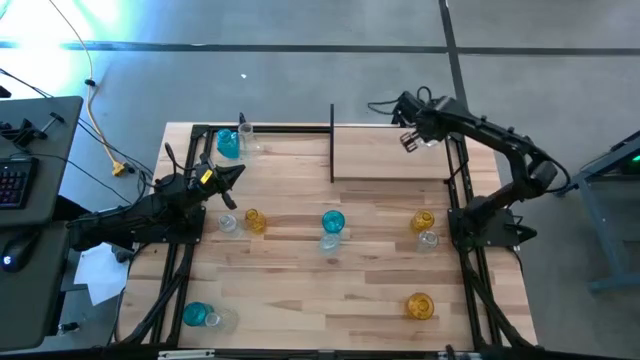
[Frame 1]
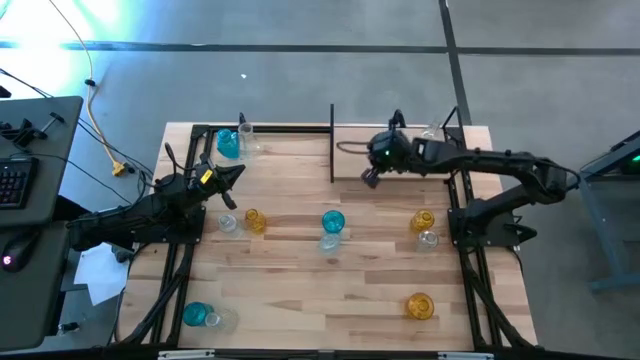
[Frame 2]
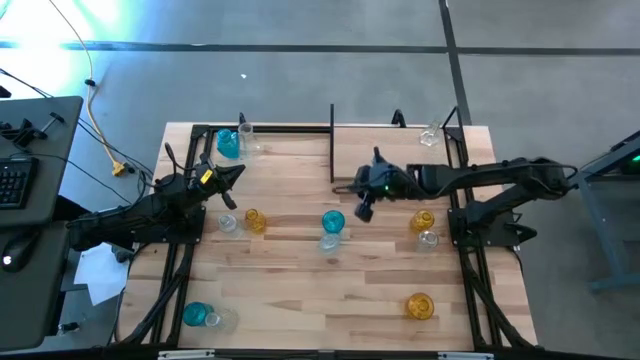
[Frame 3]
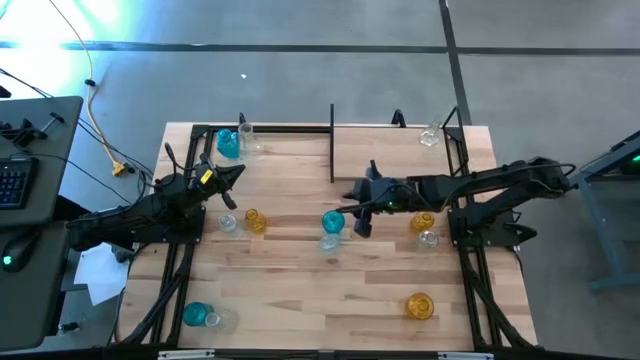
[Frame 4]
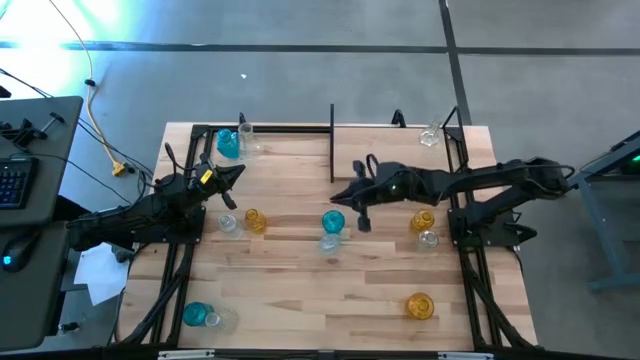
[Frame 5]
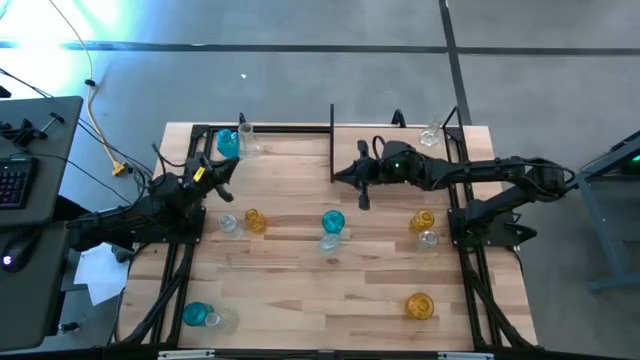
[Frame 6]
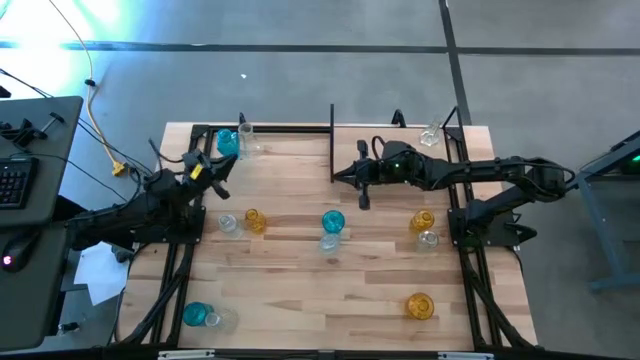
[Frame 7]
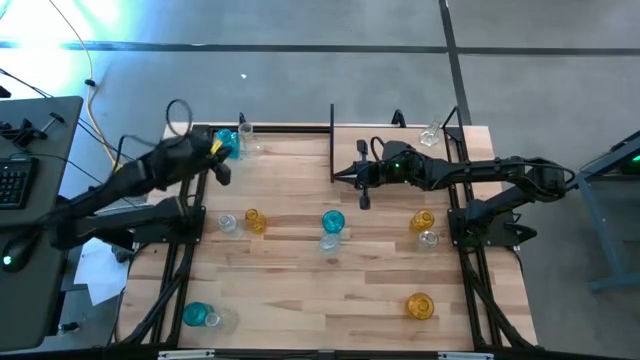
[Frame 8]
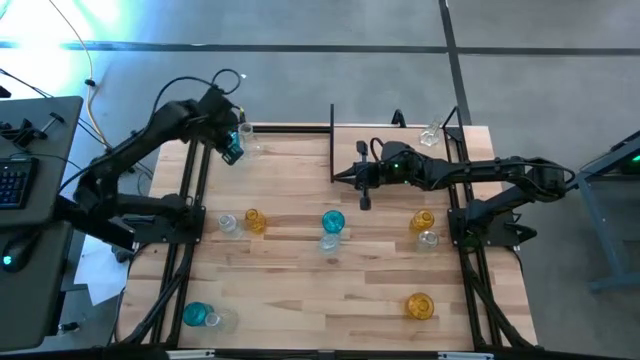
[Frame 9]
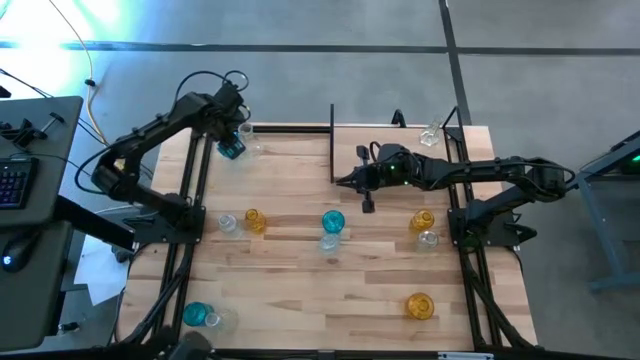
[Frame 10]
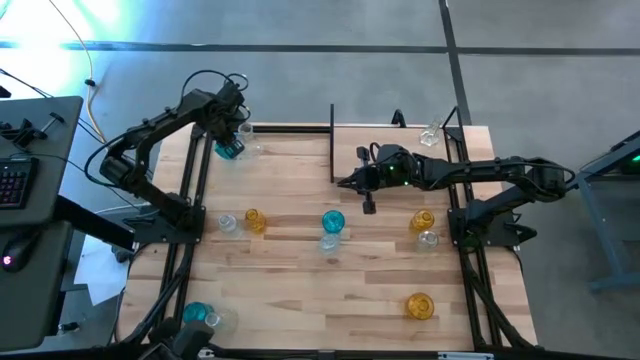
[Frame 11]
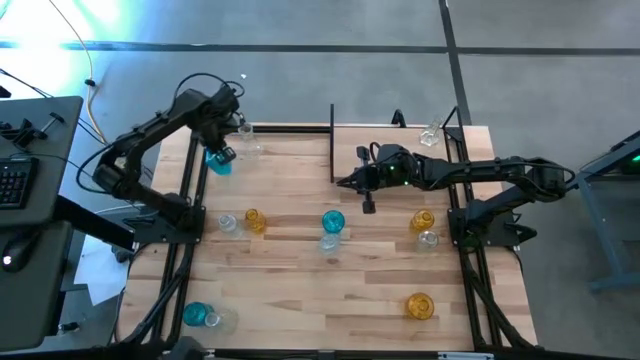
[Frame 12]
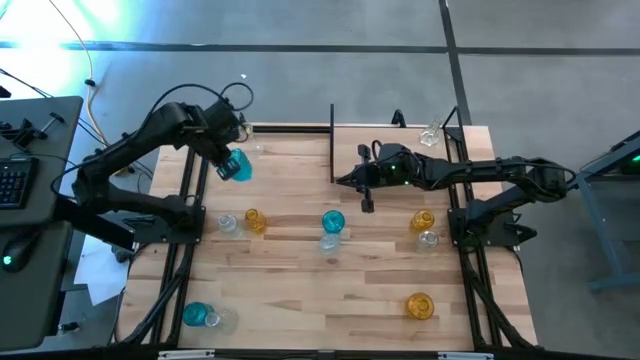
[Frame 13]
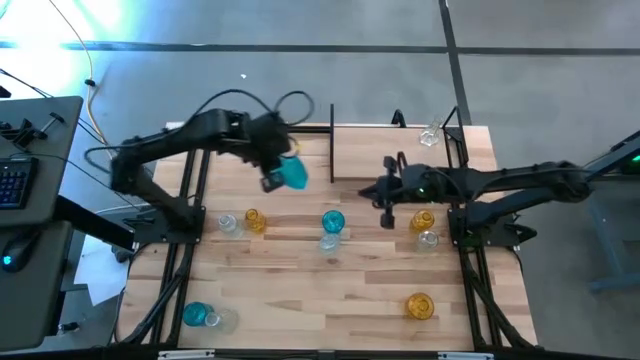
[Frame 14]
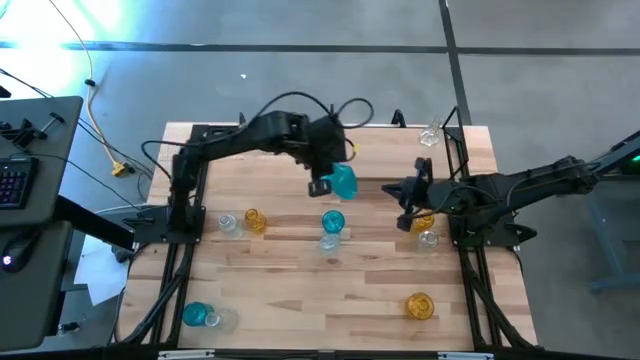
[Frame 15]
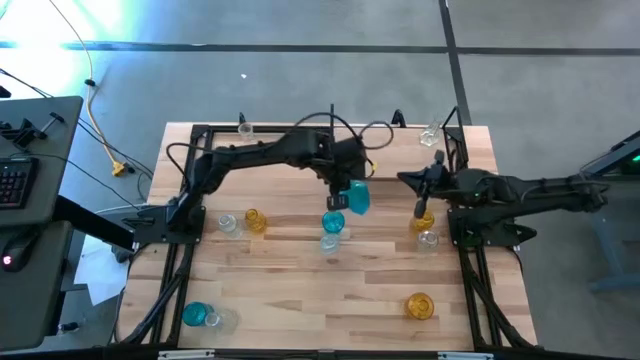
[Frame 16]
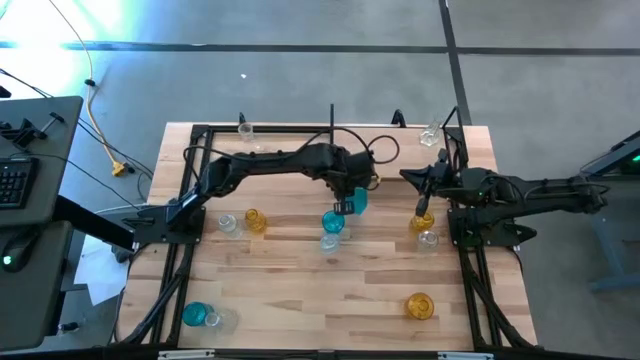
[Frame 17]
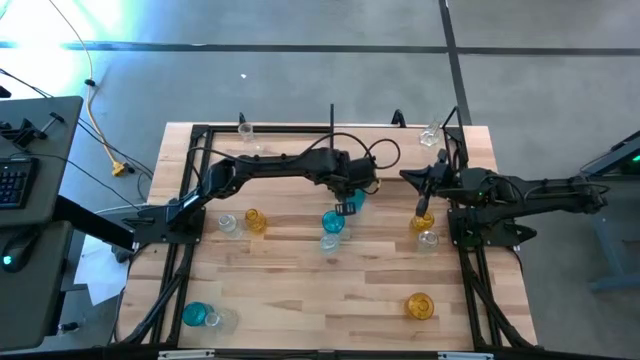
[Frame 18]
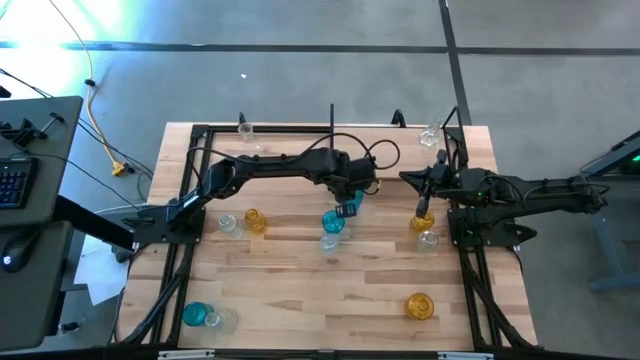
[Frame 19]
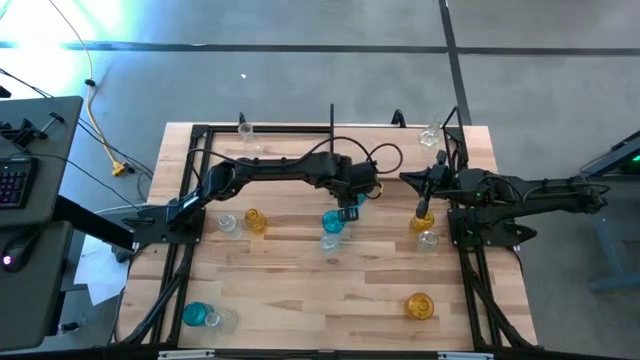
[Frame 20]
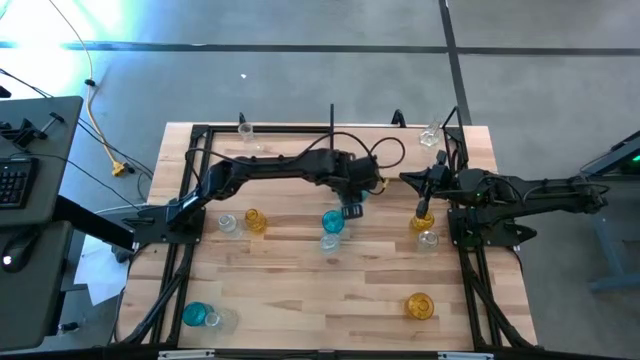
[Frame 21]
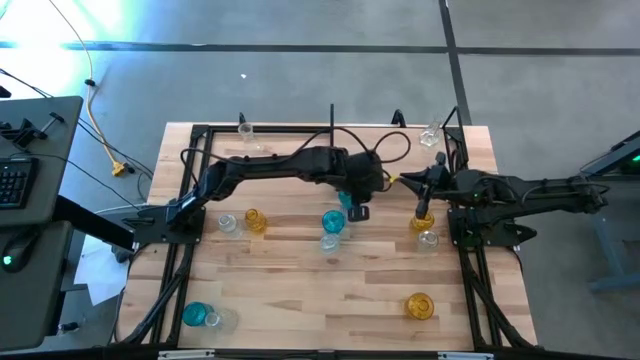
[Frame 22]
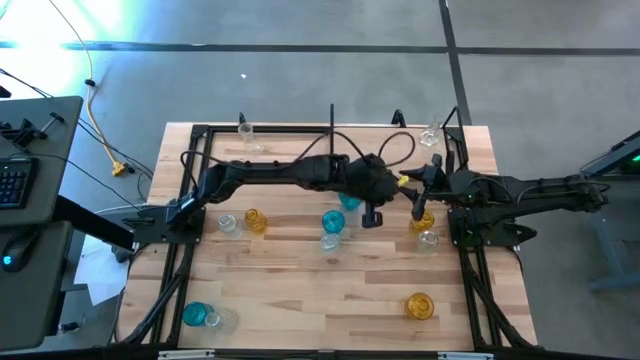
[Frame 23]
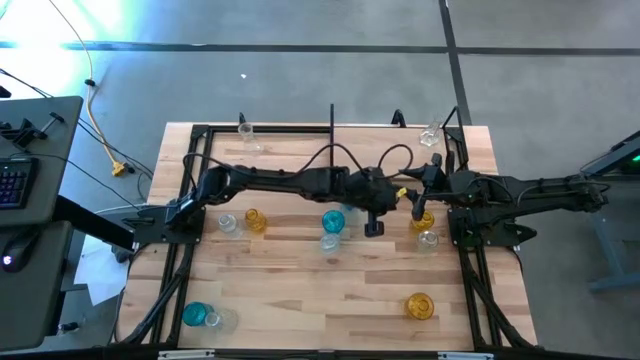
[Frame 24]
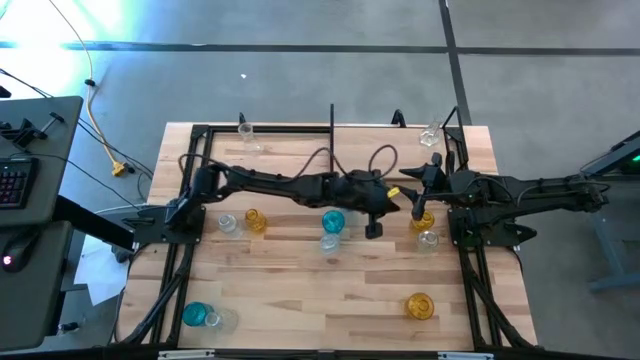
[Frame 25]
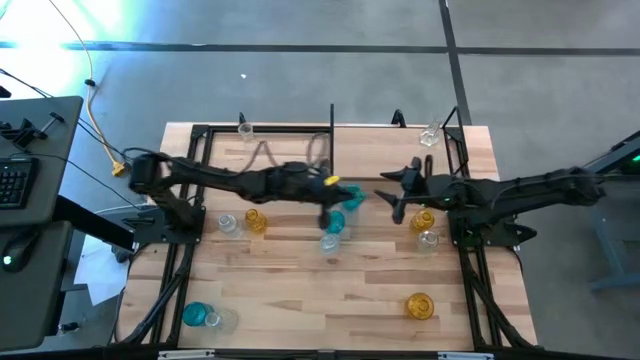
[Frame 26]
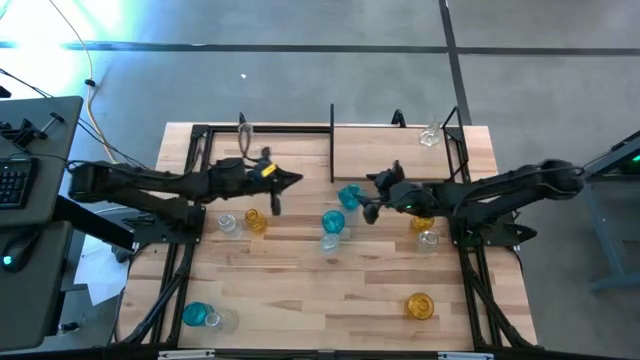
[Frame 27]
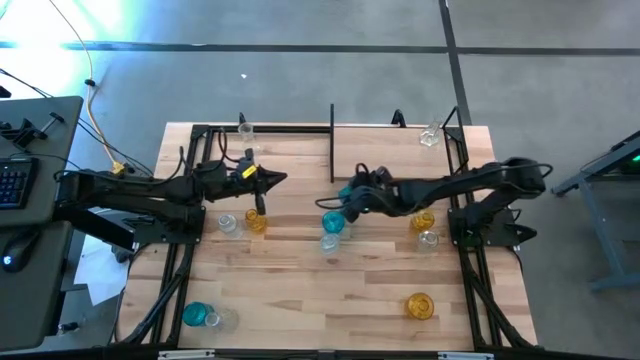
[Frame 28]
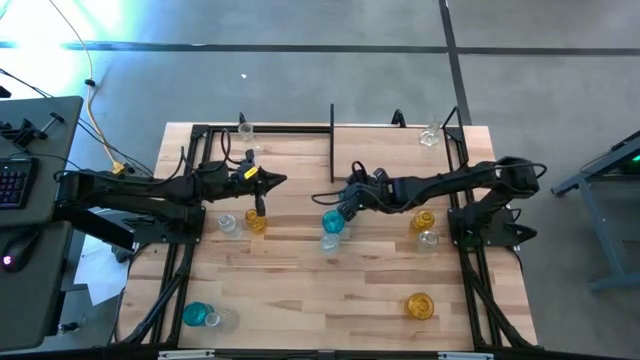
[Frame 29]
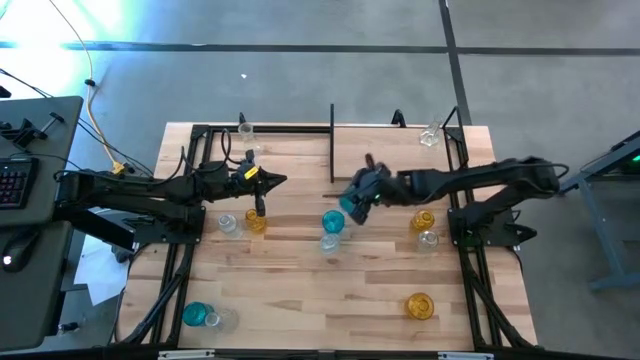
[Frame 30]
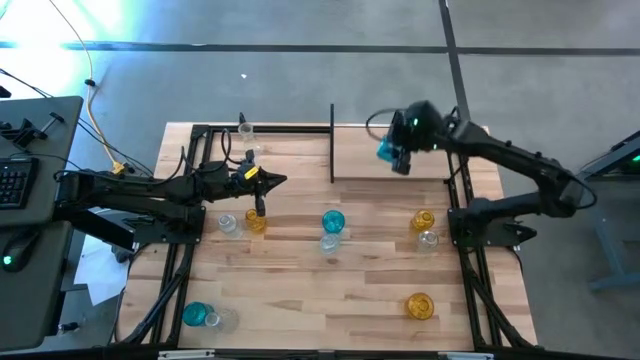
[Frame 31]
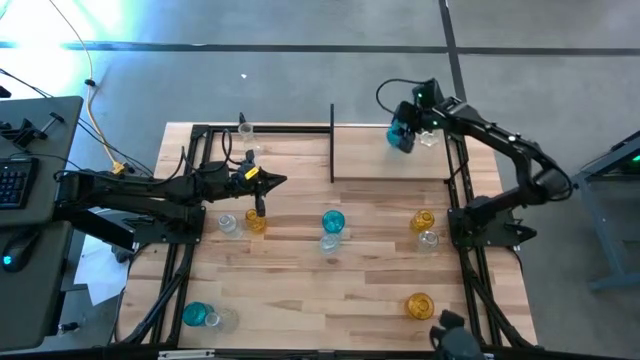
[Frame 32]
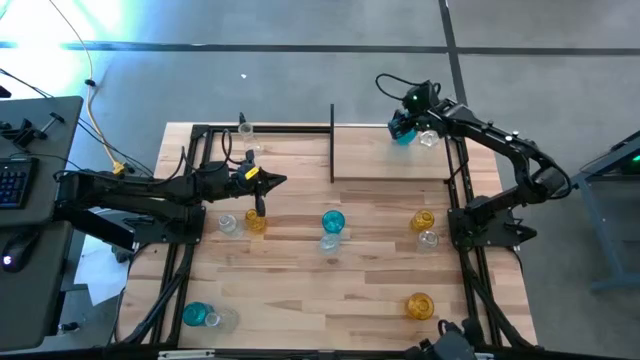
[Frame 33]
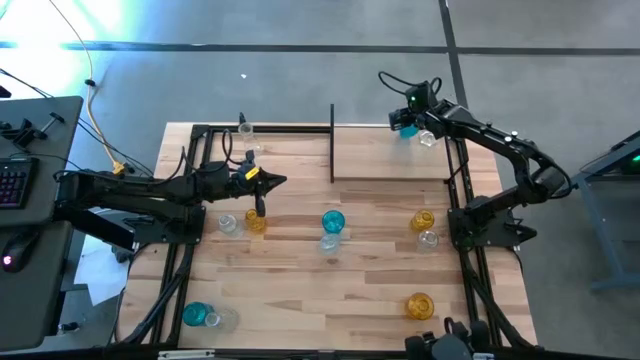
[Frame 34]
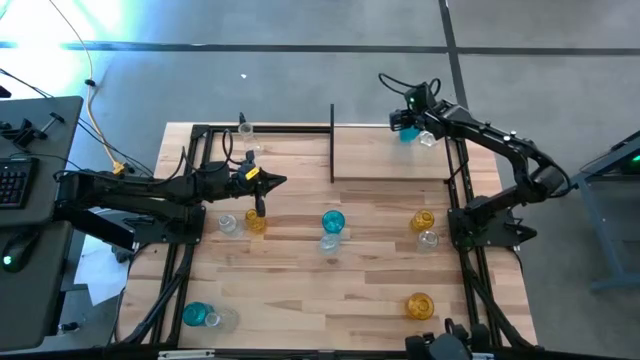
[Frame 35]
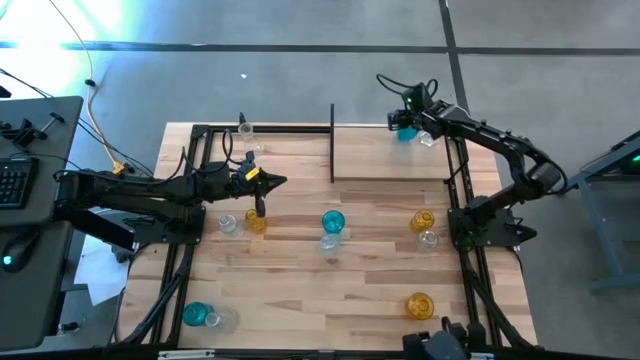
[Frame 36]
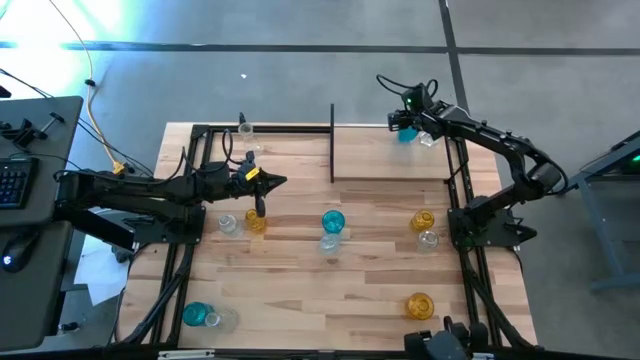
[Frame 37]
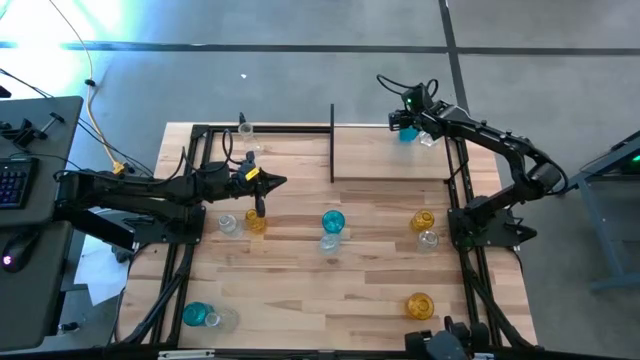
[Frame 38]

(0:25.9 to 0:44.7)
Task: sort vases onto shelf
Put the top blue vase on the shelf
